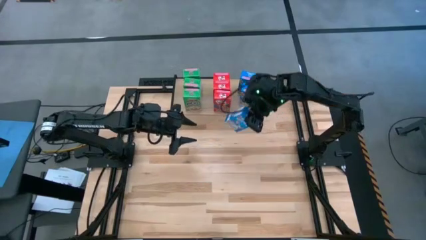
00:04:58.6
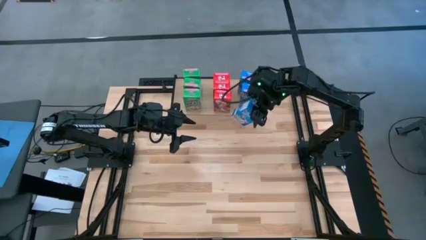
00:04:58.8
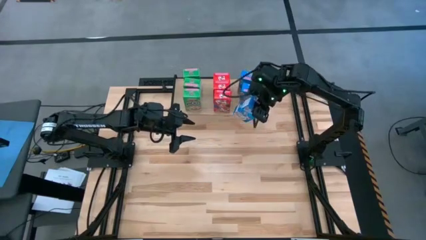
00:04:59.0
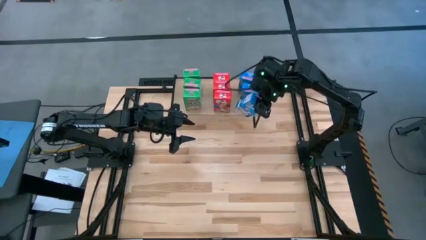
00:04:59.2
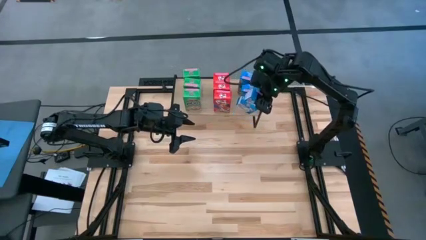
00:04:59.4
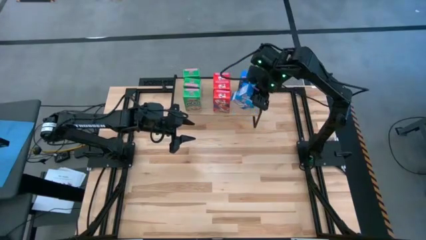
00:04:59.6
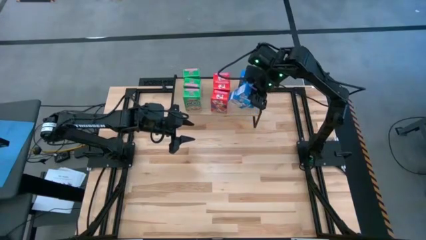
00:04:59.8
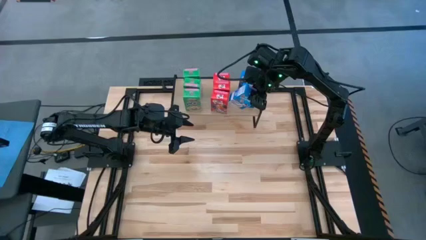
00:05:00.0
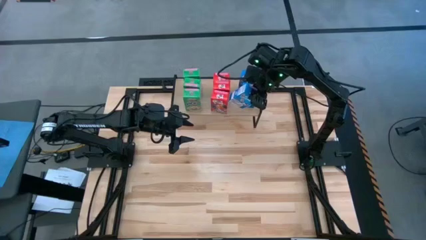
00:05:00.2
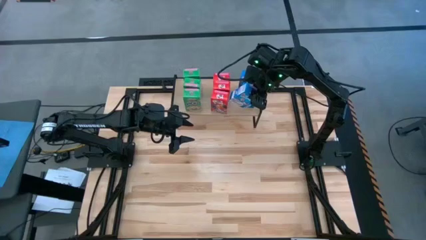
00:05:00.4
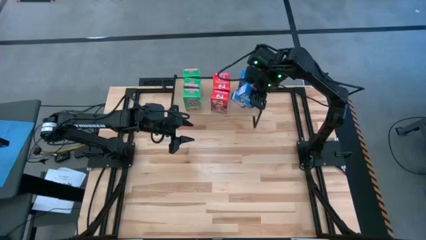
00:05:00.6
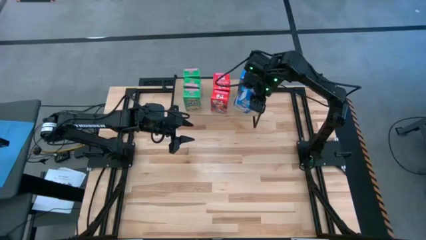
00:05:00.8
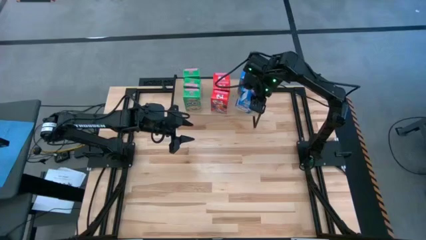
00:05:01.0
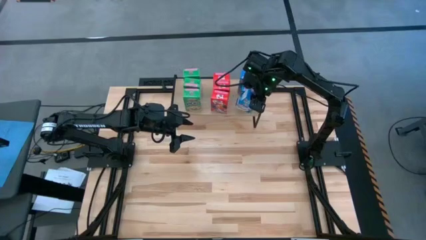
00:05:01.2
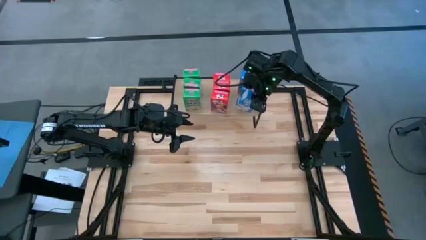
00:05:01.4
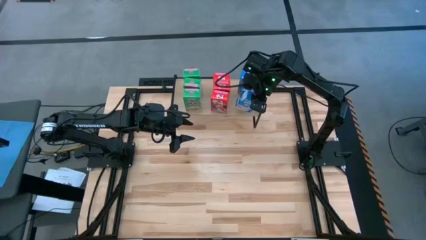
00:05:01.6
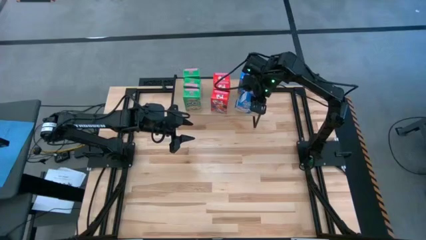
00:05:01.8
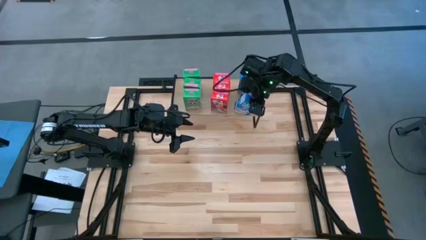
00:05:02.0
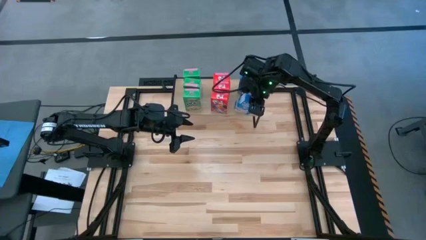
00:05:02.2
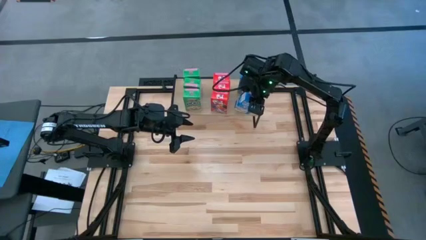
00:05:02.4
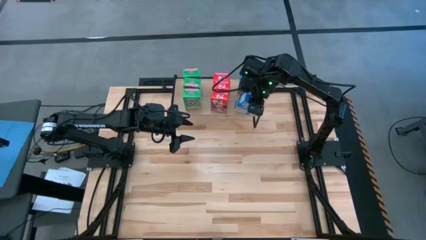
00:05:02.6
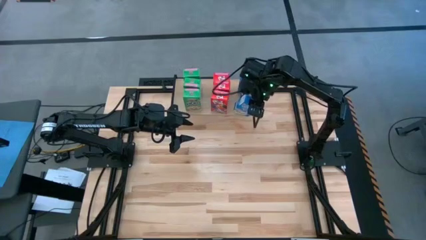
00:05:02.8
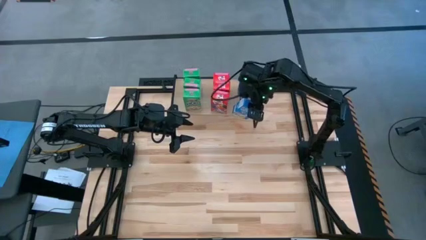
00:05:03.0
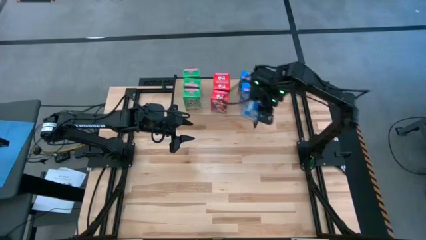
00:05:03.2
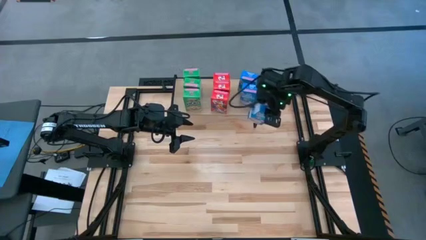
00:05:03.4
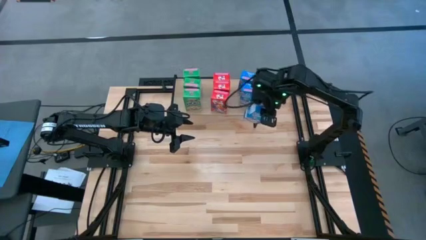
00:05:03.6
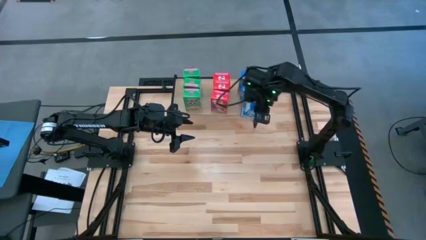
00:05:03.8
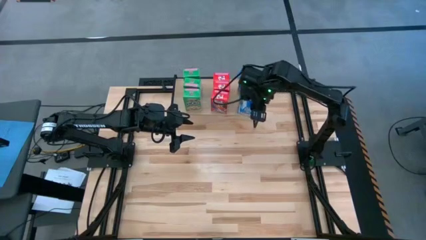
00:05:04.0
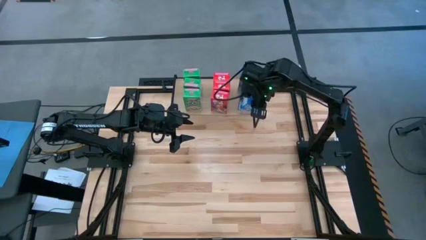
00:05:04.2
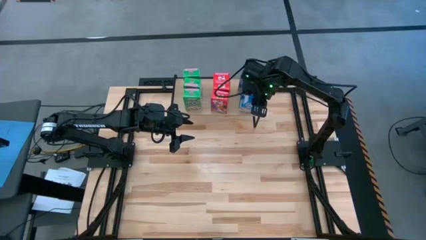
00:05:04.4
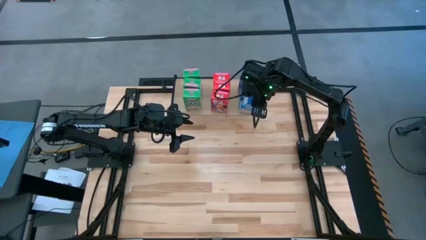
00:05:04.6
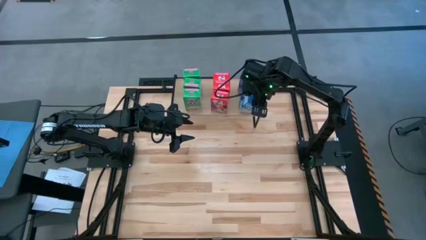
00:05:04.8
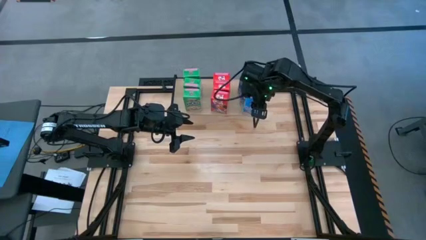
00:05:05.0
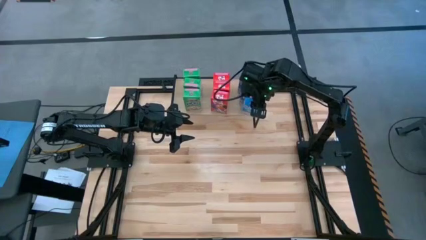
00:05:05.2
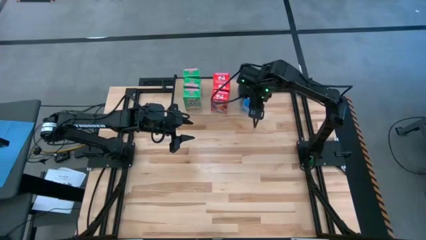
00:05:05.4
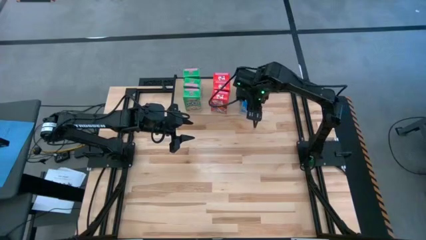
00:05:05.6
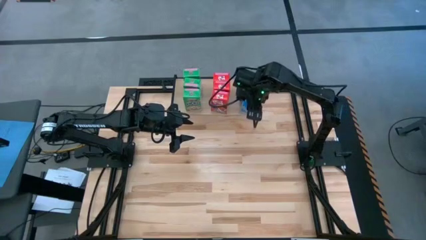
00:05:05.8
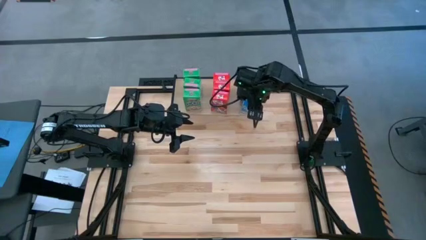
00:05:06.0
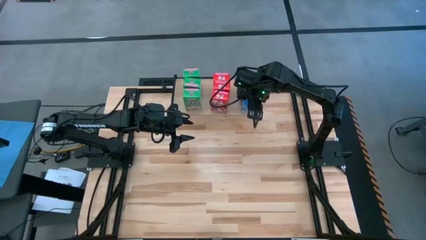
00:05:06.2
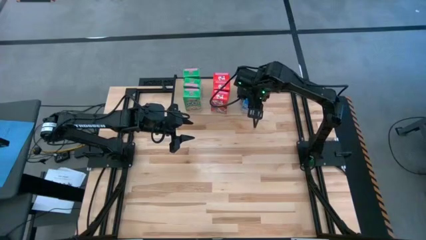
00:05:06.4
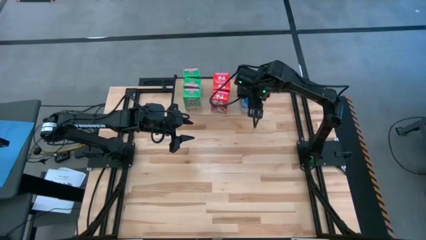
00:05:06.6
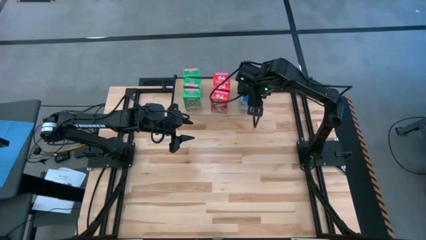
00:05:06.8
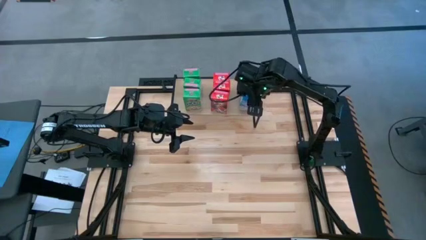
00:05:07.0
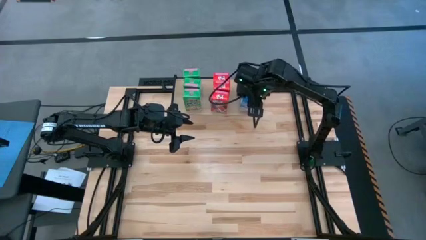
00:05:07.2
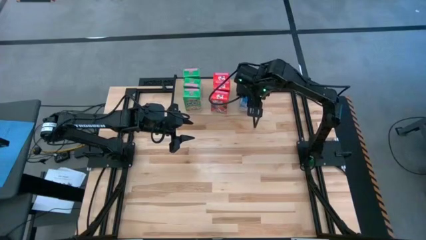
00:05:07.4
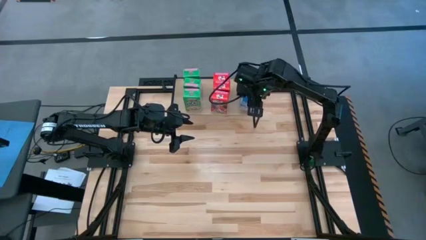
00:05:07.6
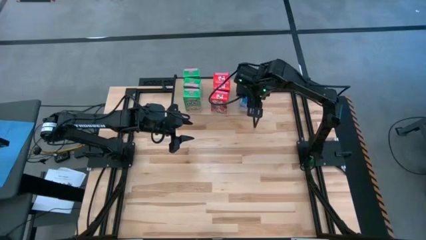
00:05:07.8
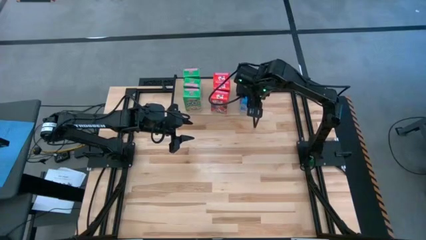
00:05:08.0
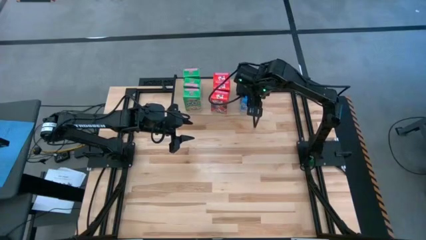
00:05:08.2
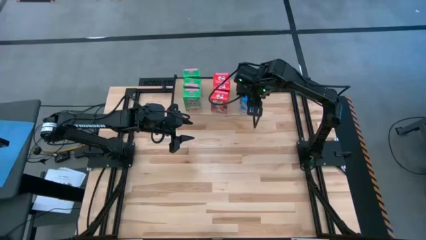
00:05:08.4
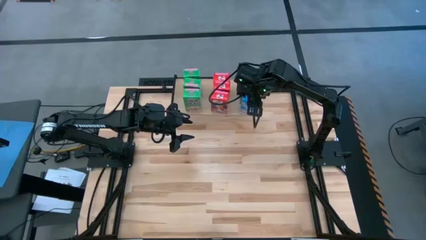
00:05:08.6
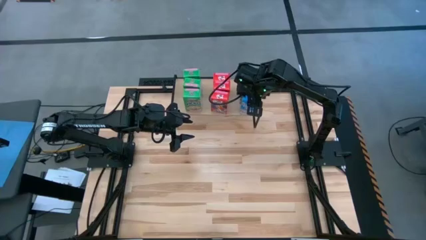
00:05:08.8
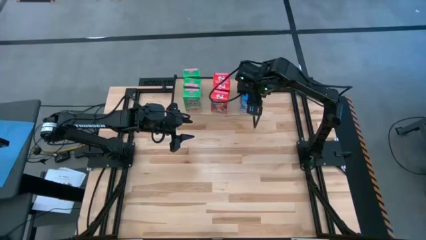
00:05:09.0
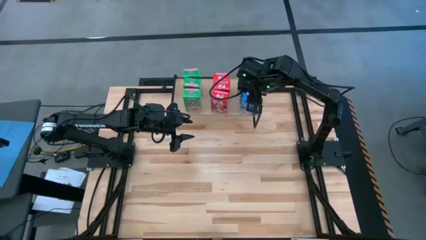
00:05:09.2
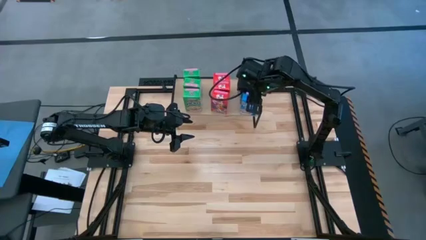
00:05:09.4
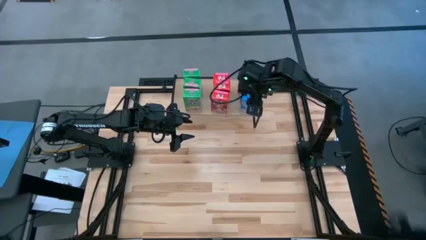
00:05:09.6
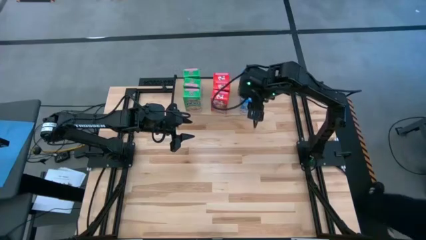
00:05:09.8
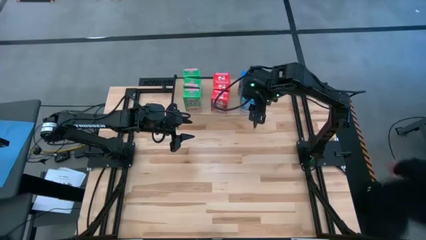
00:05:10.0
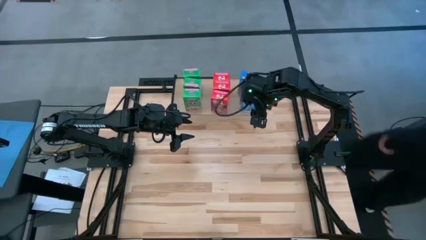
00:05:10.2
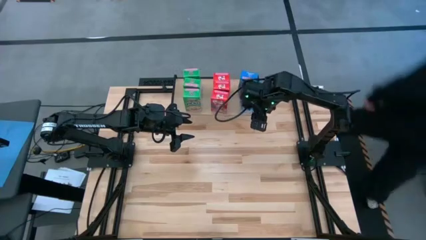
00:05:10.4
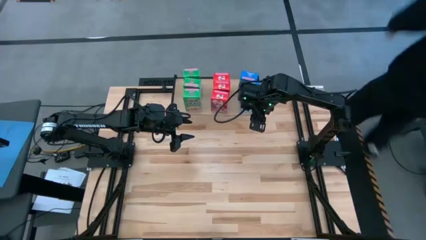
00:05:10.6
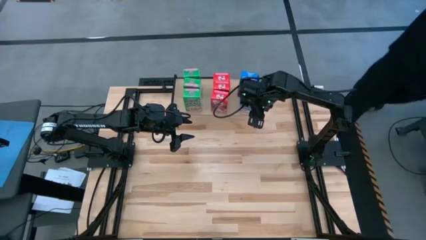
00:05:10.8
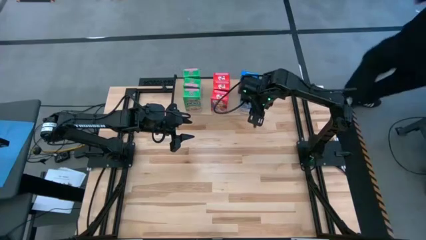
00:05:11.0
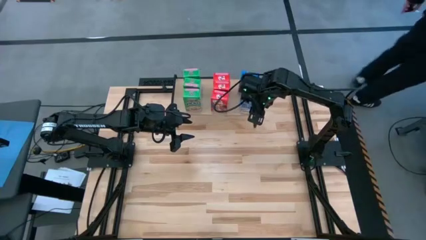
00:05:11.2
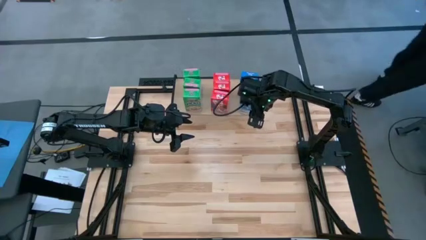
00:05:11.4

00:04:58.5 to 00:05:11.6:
Task: Stack cereal on shelf
Put the blue cereal box on the shelf aligned with the other blue cereal boxes

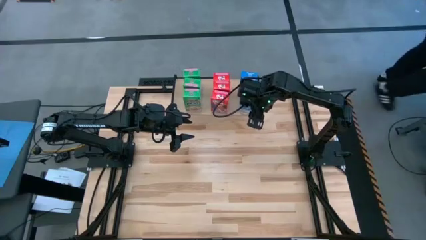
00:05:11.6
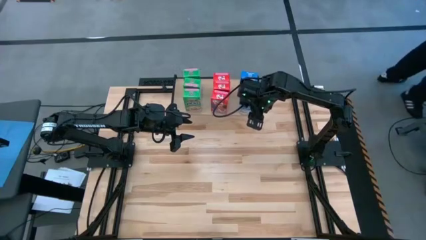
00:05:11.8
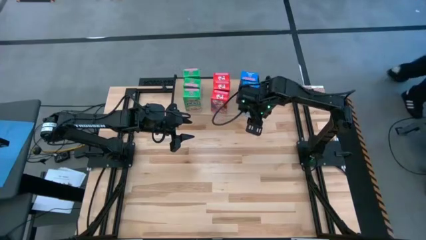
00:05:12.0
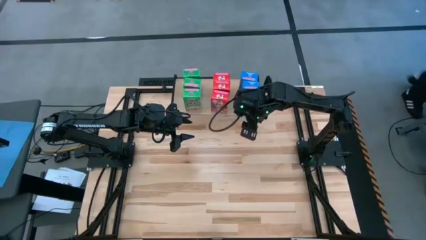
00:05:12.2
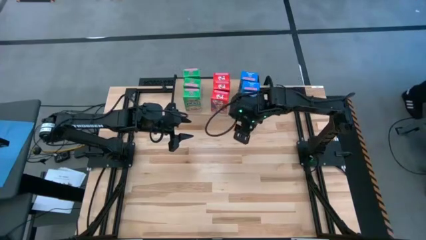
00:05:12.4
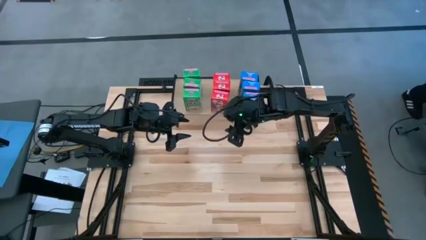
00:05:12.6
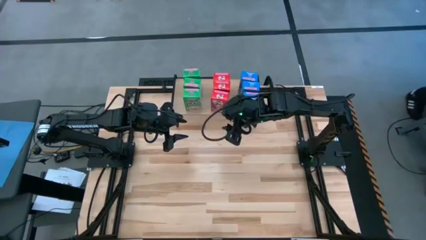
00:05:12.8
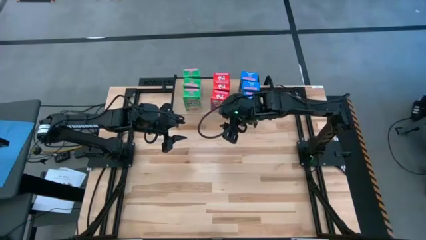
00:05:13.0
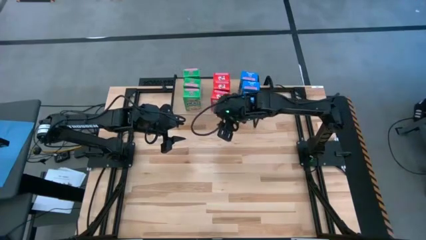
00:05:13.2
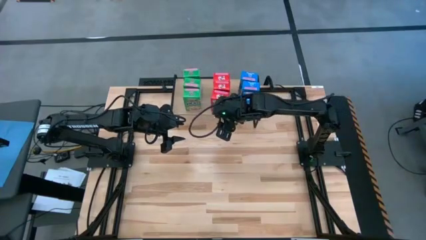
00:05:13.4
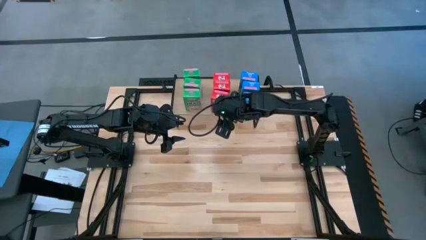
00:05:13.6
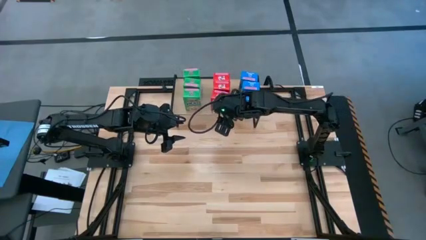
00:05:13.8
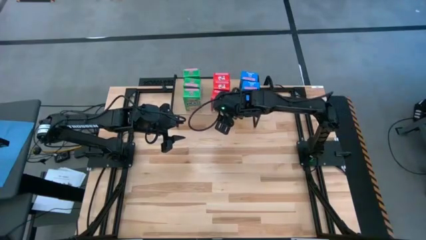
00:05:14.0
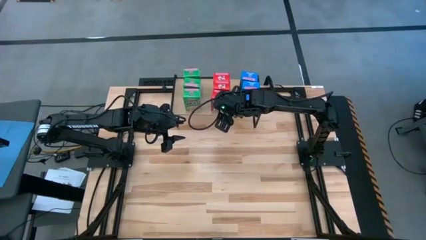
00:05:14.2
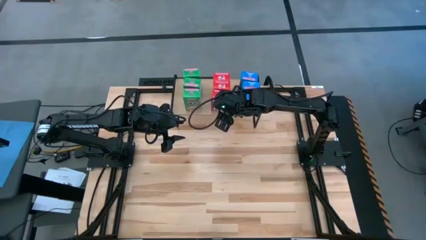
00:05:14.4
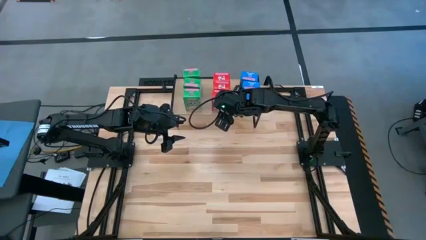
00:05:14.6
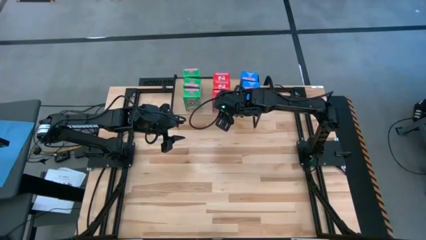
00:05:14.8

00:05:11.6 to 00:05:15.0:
Adjust the red cereal box on the shelf

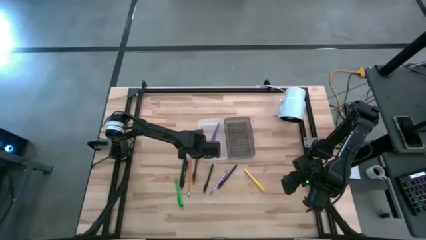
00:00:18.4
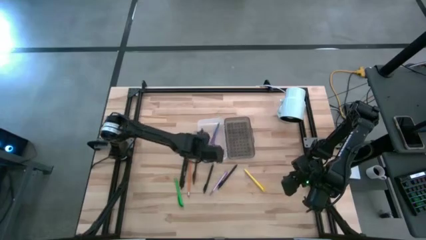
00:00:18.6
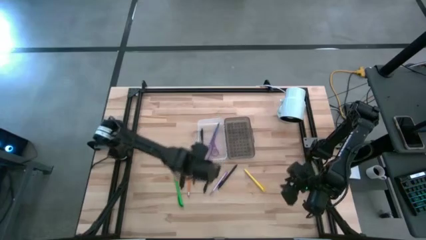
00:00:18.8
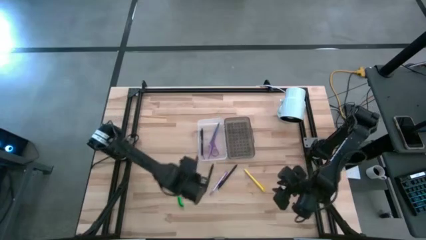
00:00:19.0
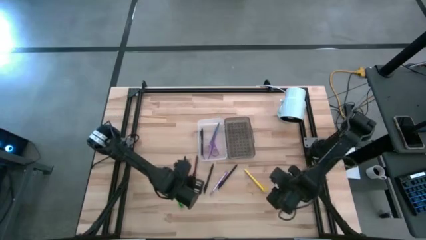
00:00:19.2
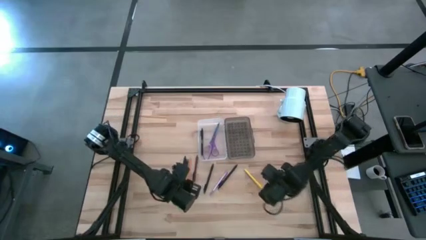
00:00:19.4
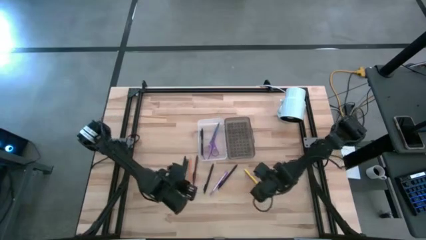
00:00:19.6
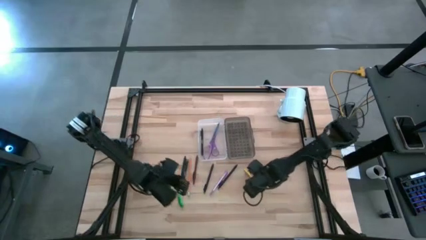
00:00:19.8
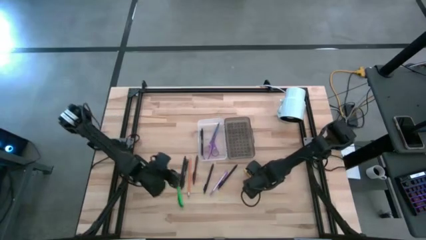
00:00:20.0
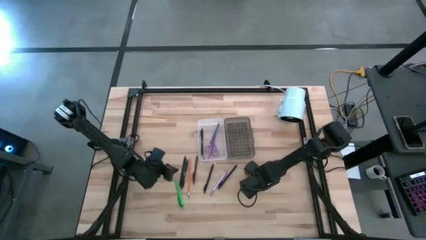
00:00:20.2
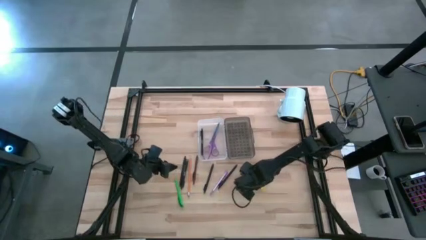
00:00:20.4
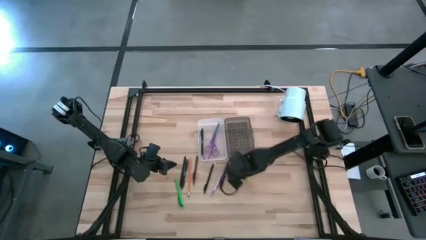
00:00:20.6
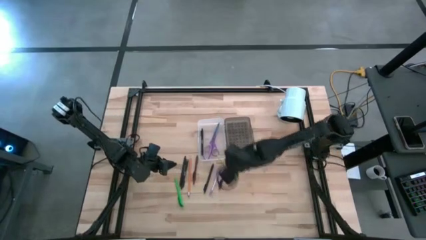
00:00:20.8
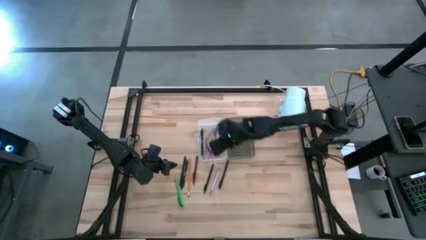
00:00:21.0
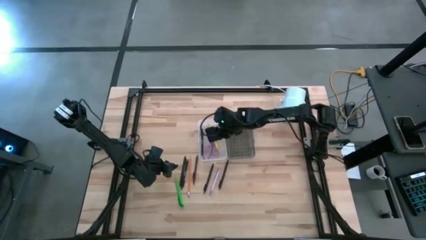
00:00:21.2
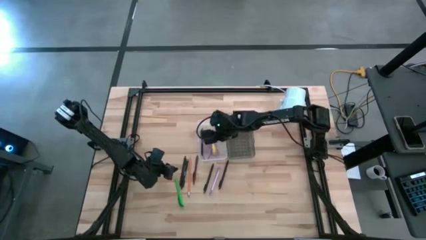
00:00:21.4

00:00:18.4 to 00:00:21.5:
Task: Pick & place school supplies into a supply box
Put the yellow pen into the supply box
